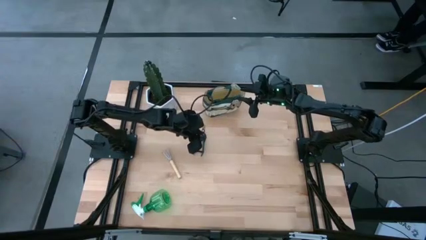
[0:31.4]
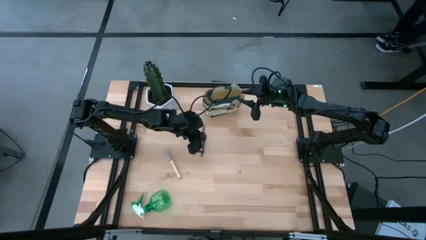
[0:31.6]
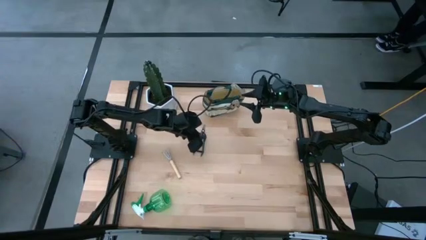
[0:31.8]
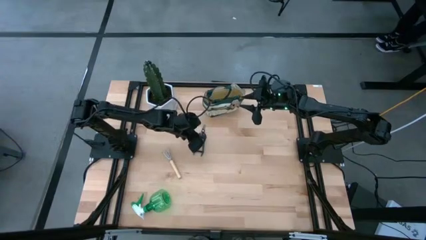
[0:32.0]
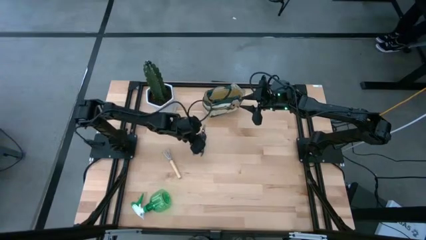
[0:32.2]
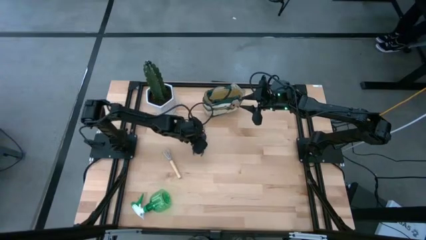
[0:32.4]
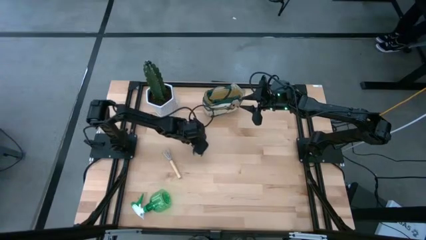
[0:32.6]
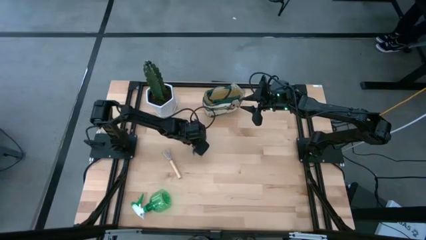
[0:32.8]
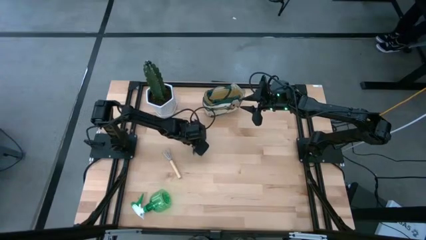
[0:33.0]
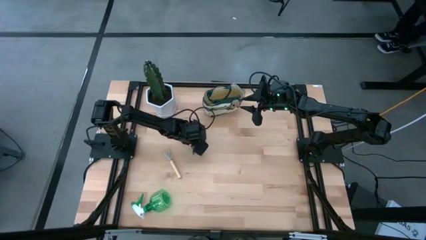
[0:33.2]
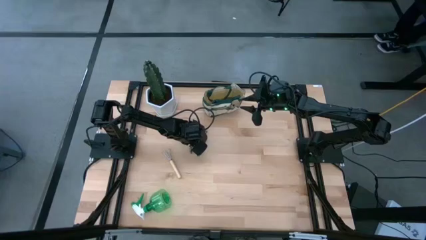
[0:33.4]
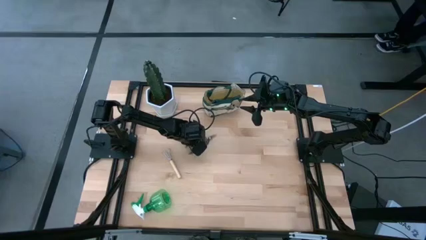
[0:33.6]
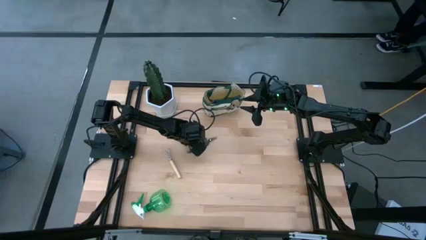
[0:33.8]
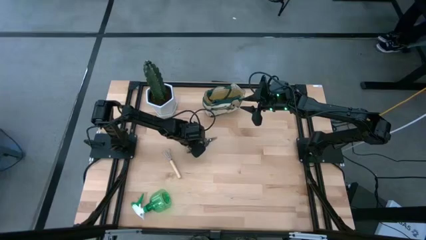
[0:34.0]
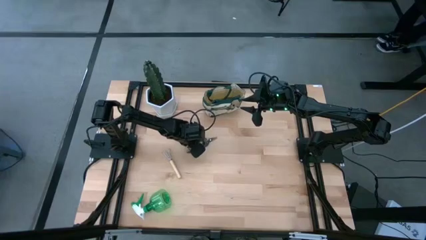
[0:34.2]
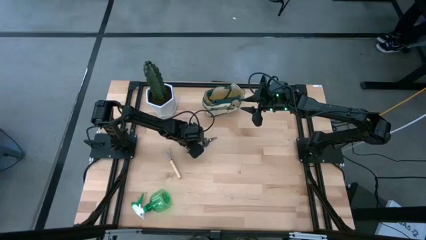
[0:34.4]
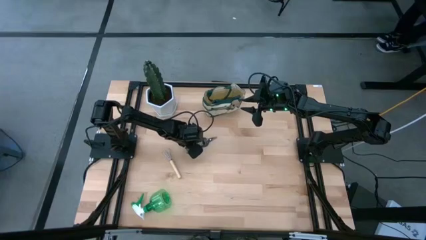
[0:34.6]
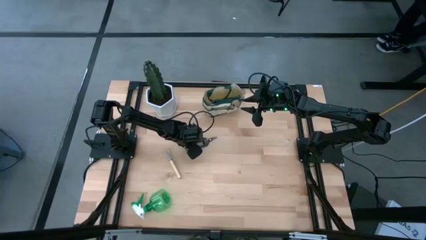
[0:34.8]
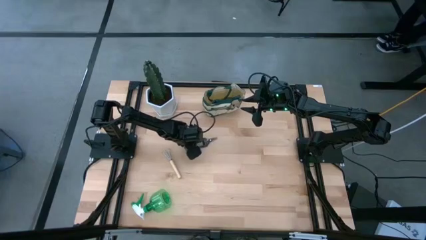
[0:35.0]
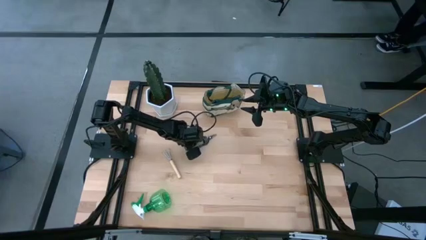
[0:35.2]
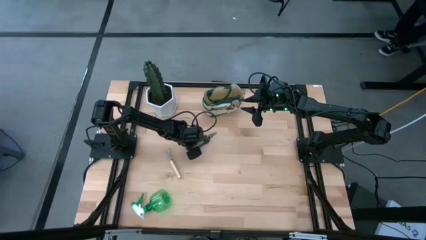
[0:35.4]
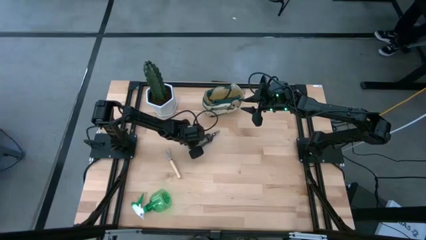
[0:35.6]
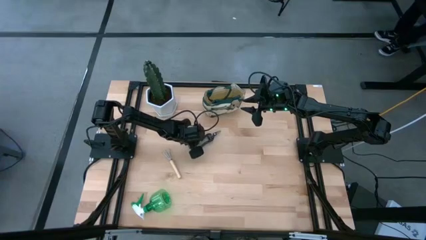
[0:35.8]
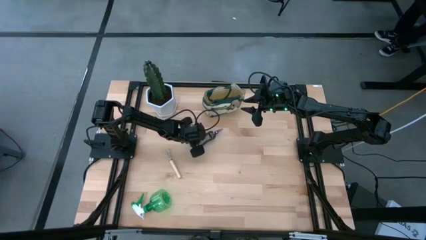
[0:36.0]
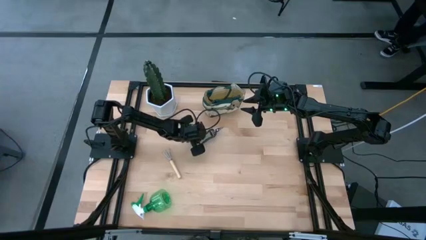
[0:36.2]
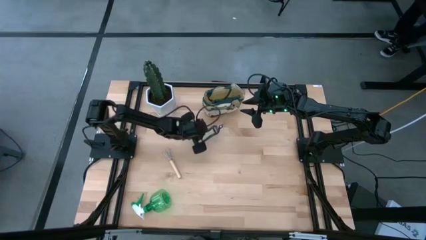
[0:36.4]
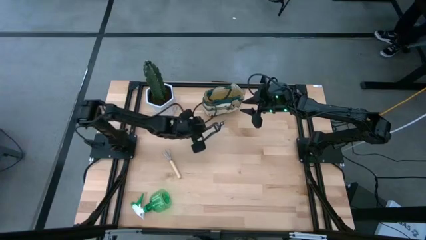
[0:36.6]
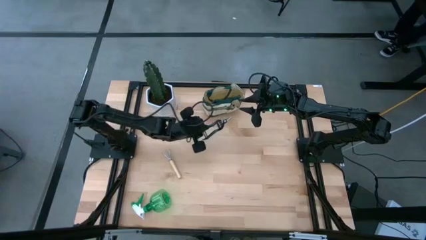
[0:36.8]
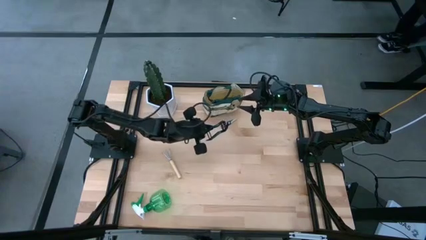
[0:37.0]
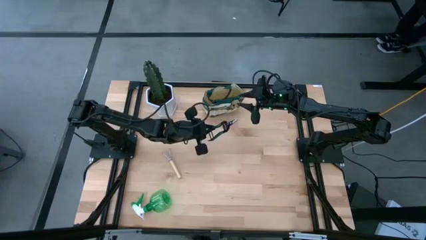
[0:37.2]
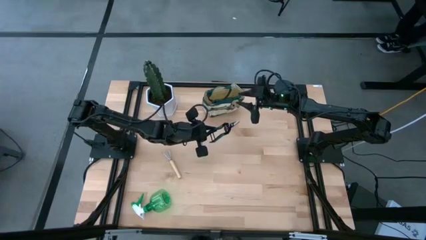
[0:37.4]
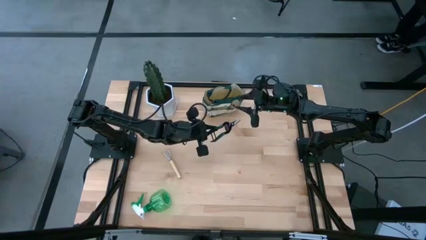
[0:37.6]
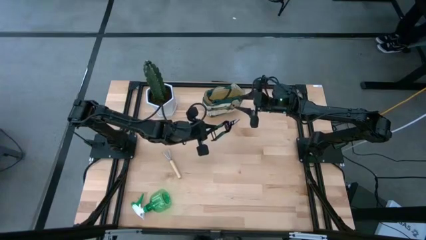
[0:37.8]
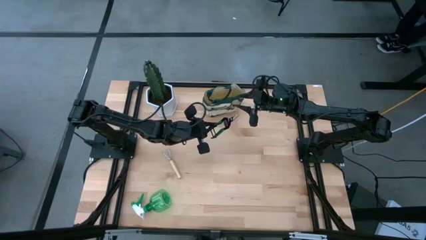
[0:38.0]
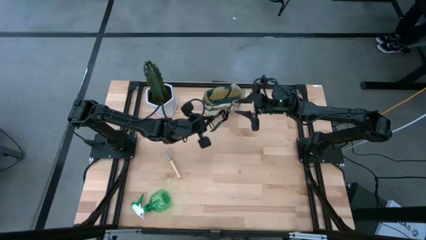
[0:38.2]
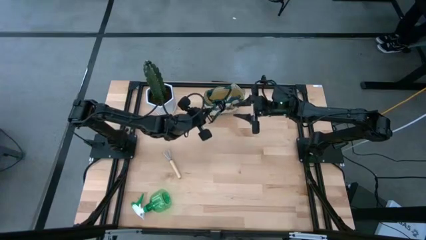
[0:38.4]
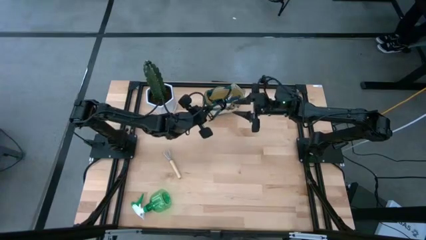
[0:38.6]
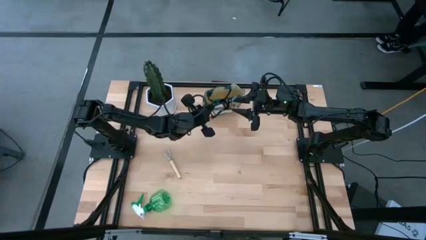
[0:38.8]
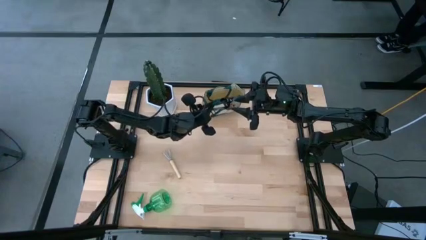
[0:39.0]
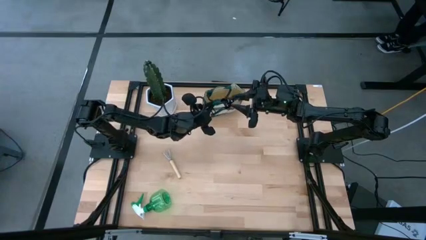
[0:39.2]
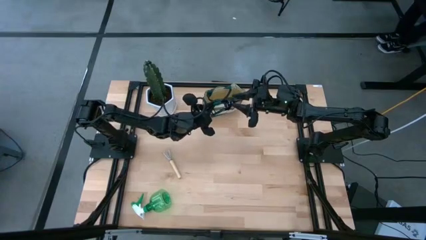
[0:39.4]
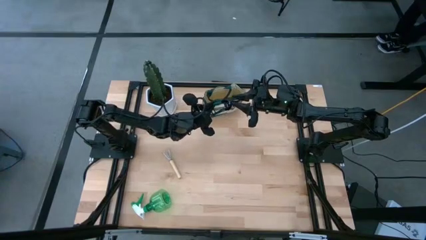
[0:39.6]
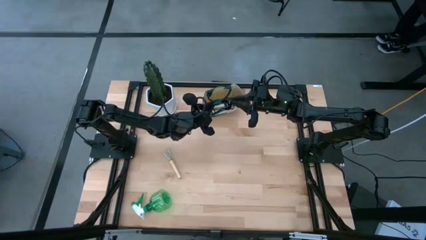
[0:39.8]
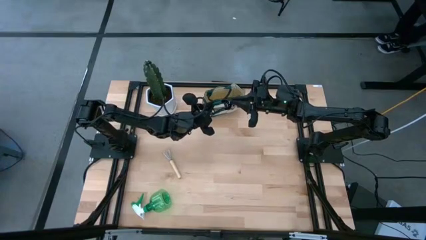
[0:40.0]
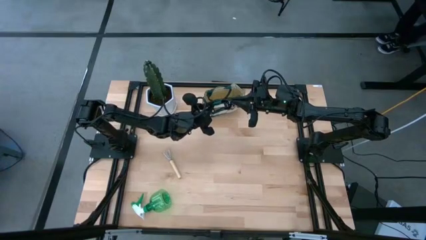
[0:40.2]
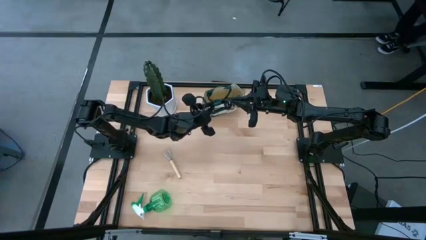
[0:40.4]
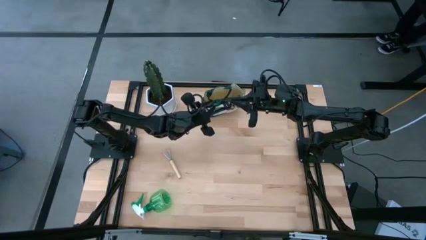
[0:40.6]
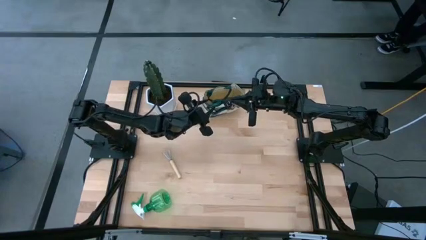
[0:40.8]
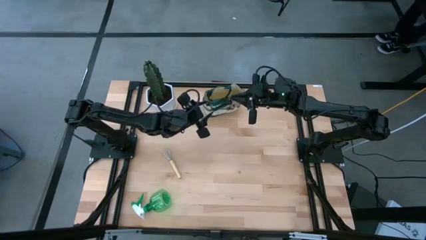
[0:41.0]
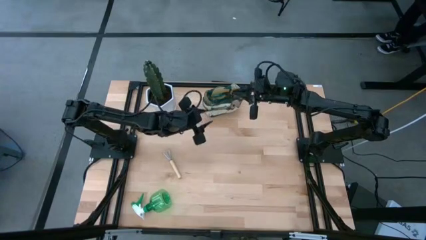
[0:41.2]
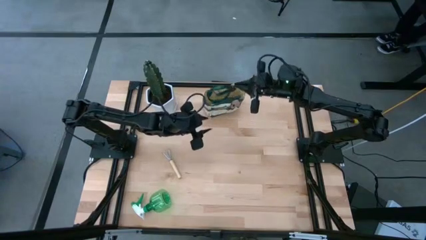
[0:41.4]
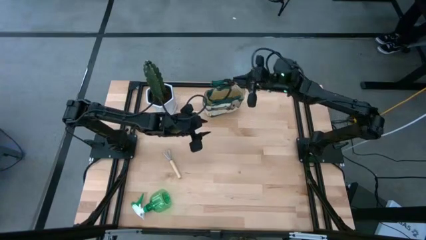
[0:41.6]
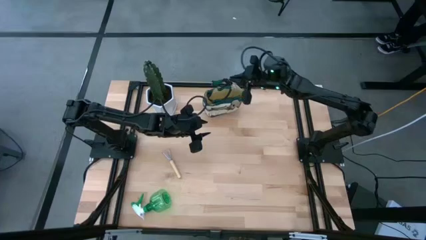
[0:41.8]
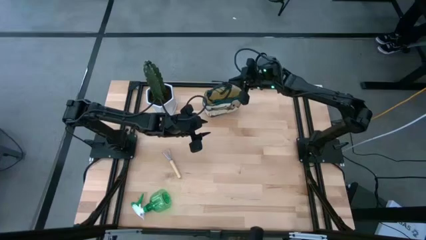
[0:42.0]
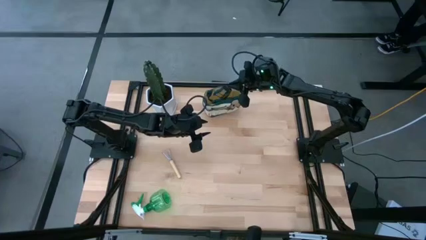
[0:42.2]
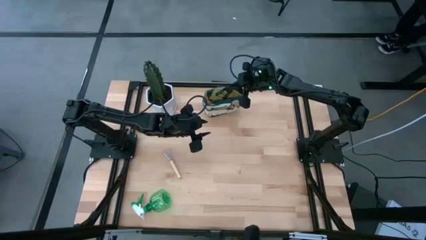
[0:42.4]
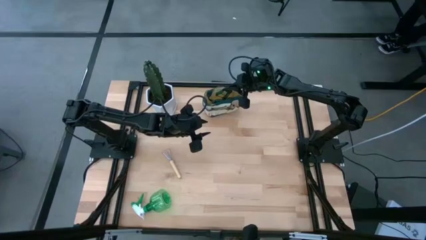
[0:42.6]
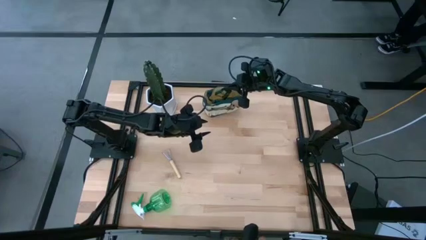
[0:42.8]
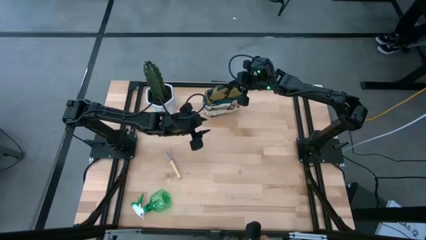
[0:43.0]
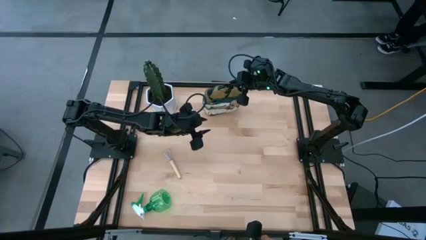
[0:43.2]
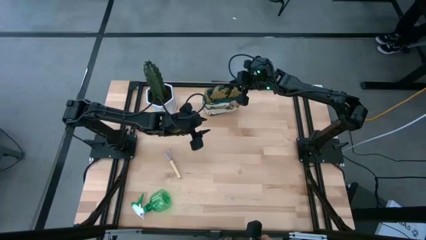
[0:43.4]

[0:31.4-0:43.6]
Task: Pick & Place Garden tools in Gardening bag
Put the shear scissors into the gardening bag

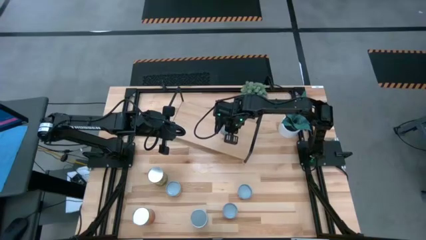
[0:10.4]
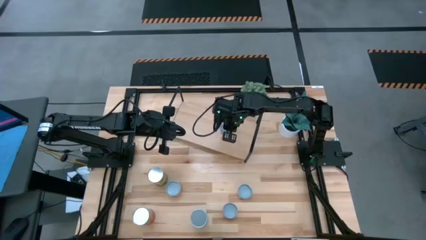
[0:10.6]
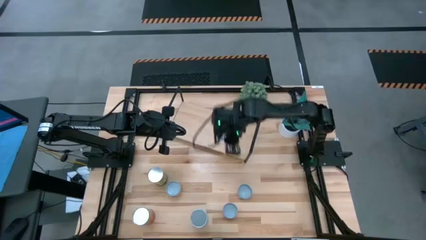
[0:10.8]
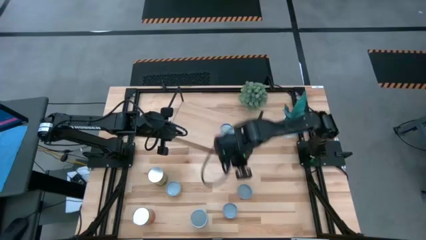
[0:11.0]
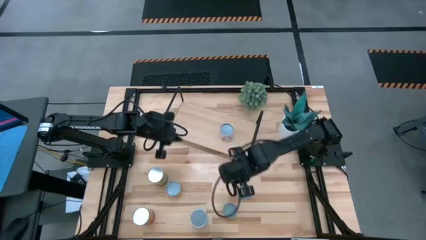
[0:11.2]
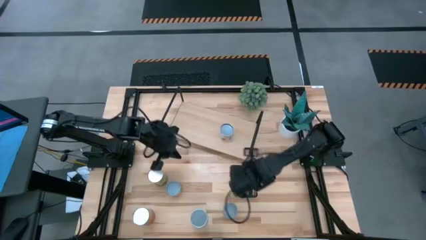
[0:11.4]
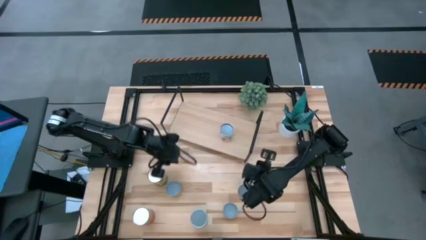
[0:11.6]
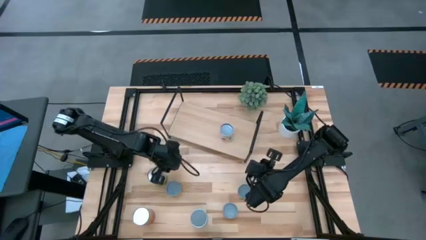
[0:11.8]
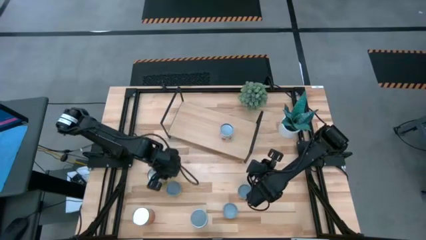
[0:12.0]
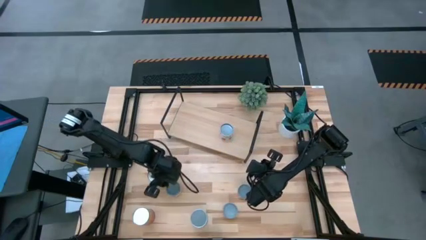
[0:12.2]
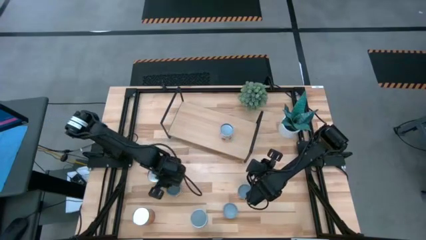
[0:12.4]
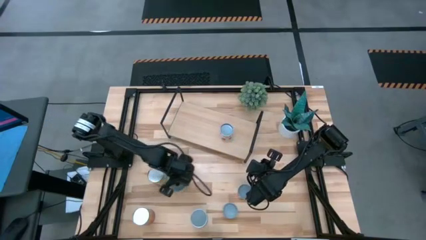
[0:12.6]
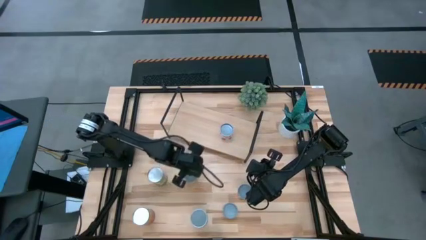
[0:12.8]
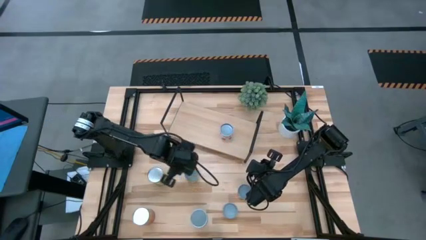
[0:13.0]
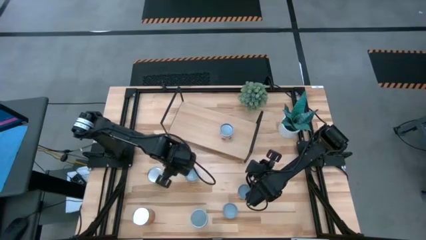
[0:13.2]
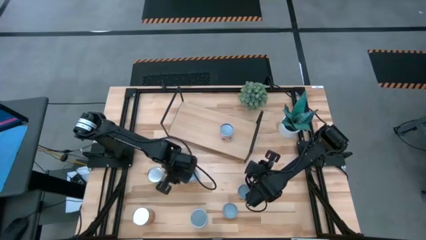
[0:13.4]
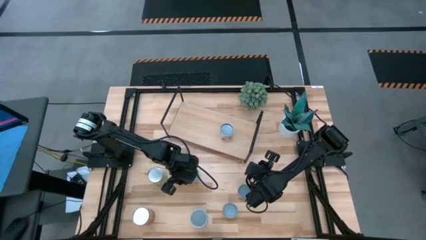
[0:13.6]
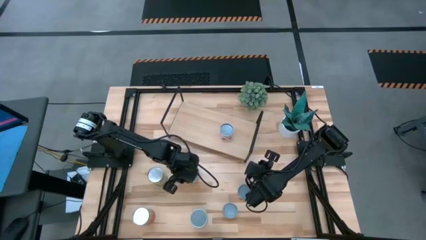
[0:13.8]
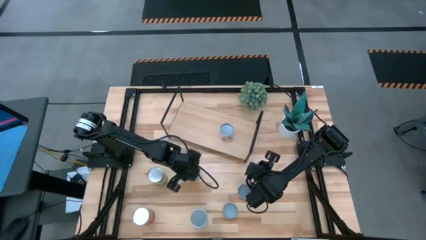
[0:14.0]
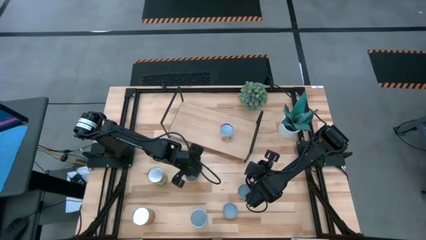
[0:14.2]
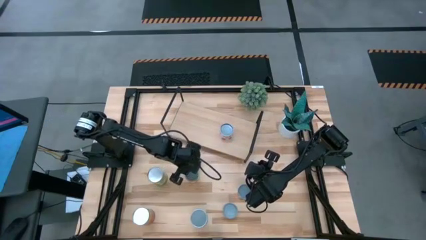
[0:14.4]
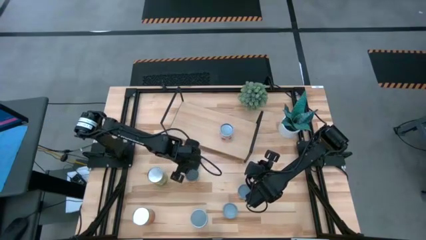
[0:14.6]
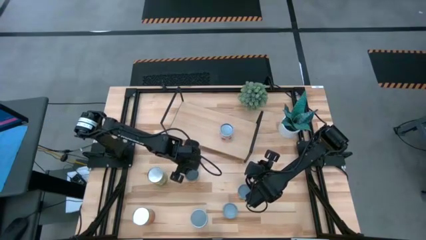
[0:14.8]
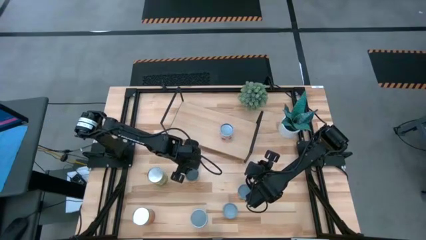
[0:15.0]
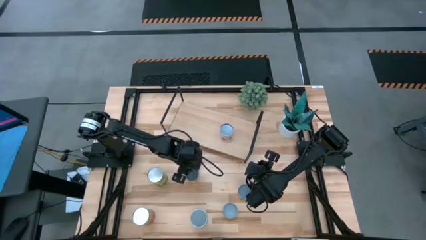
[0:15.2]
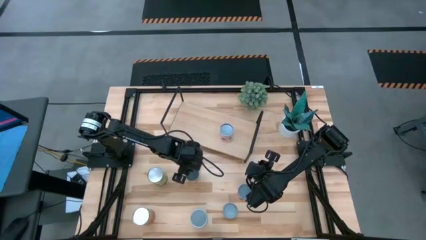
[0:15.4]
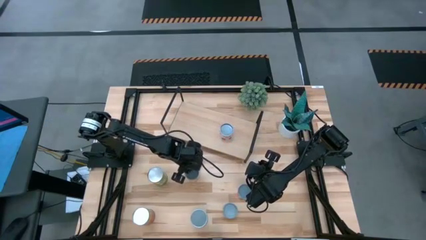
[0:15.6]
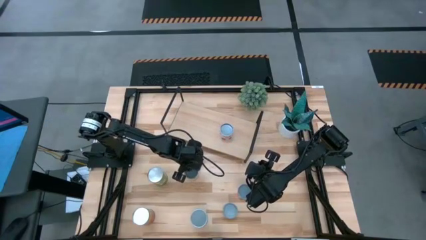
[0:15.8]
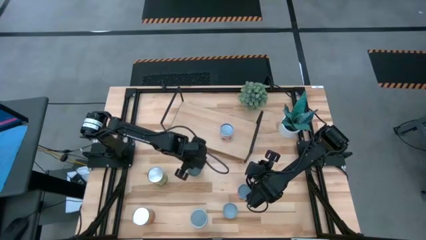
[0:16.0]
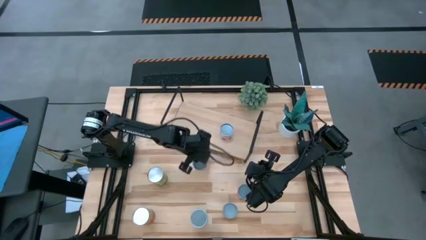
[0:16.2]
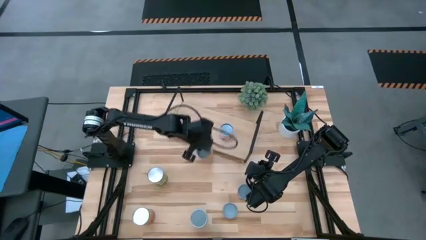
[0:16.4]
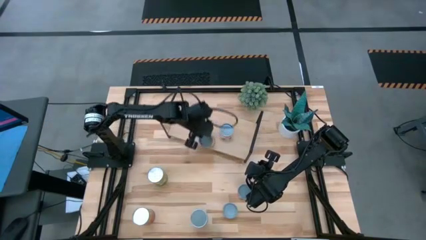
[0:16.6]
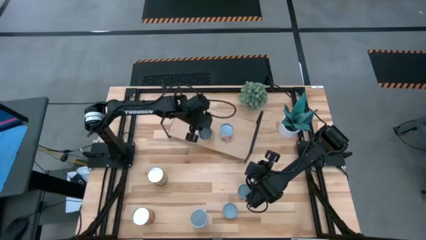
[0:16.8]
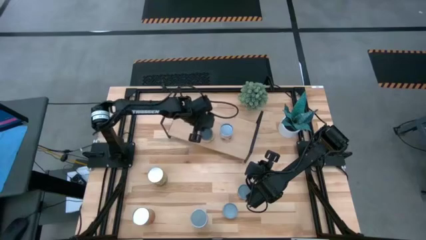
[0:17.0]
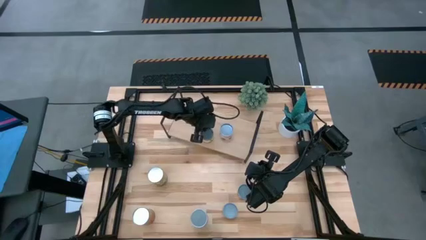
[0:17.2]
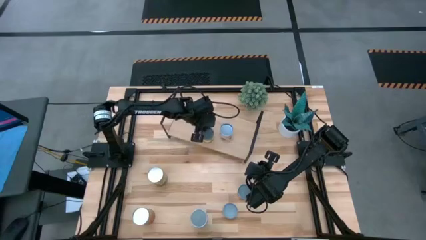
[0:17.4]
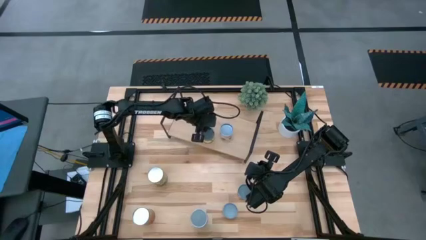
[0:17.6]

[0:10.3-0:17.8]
Task: Pick and place cans onto a shelf
Put the canned peaches on the shelf
